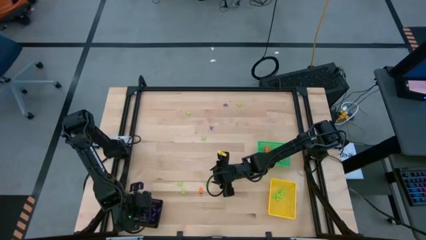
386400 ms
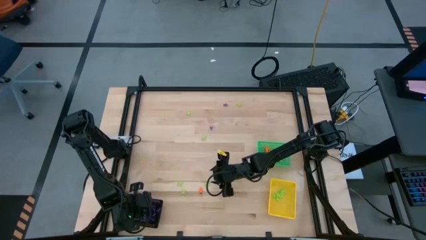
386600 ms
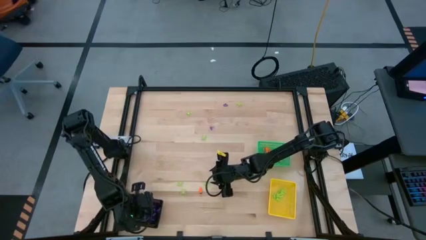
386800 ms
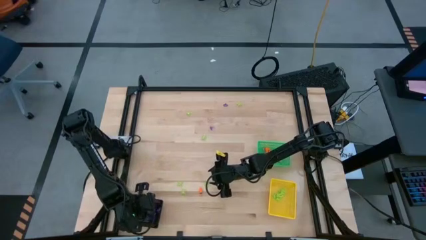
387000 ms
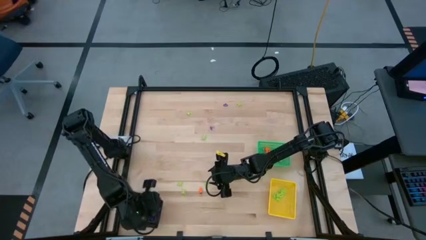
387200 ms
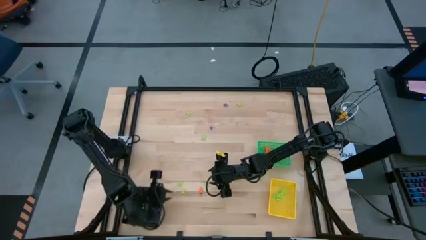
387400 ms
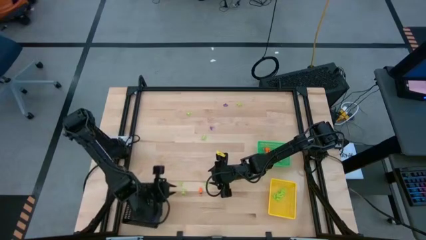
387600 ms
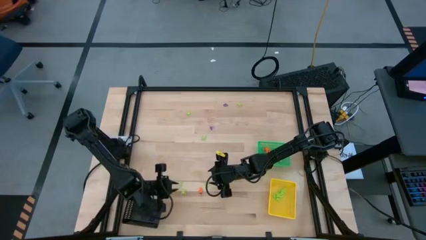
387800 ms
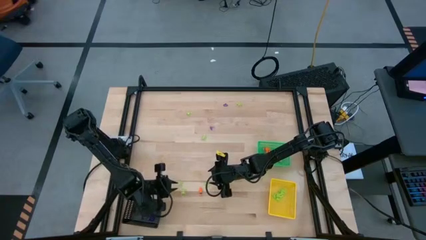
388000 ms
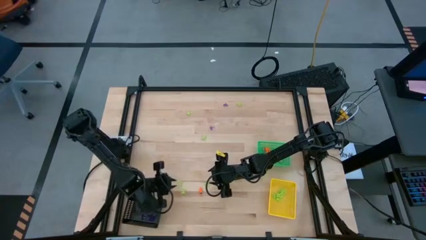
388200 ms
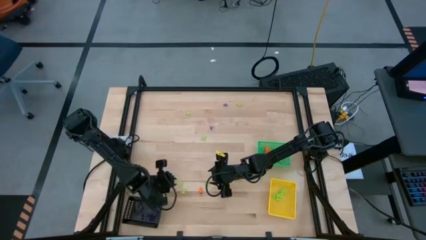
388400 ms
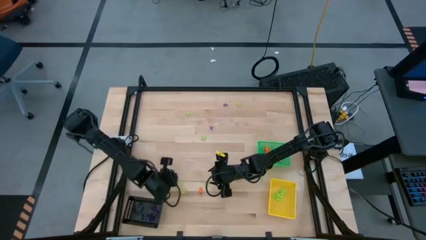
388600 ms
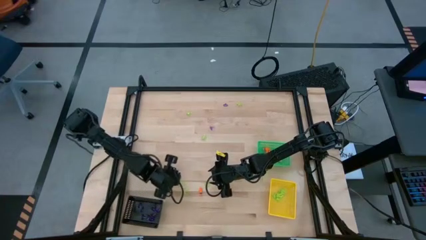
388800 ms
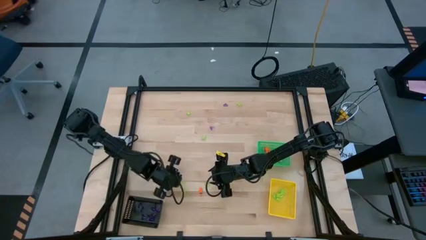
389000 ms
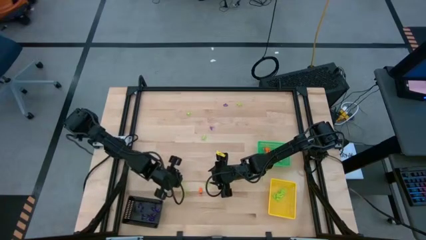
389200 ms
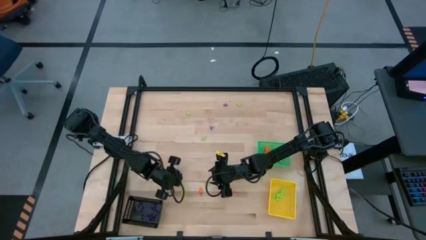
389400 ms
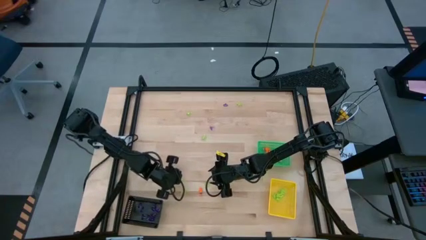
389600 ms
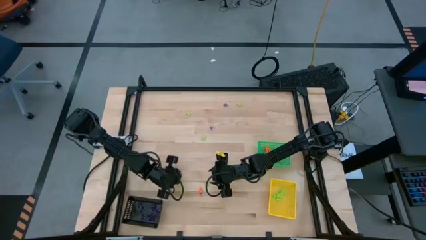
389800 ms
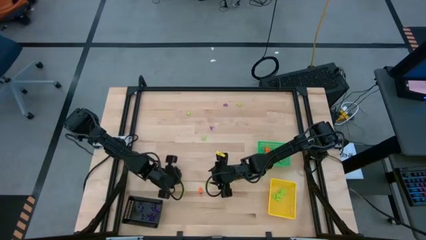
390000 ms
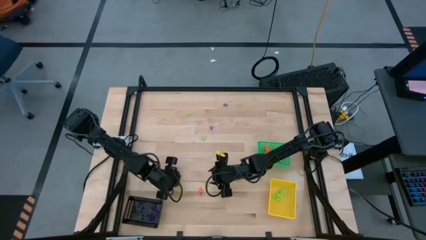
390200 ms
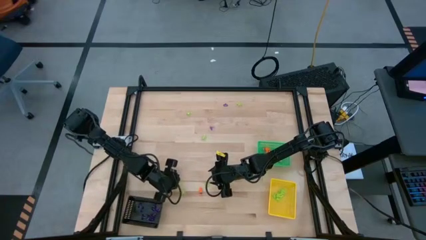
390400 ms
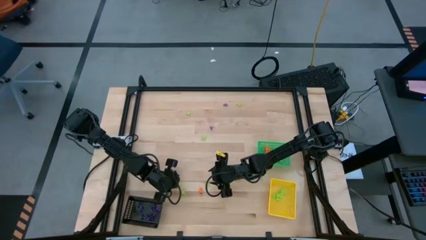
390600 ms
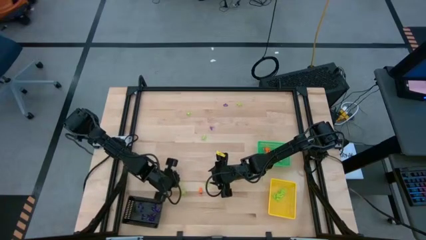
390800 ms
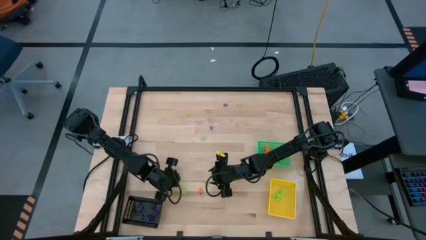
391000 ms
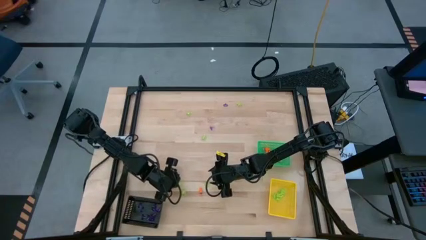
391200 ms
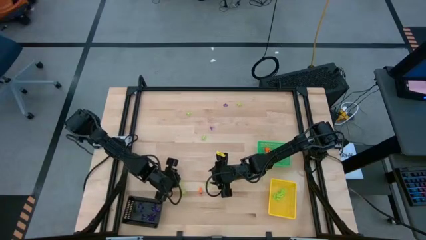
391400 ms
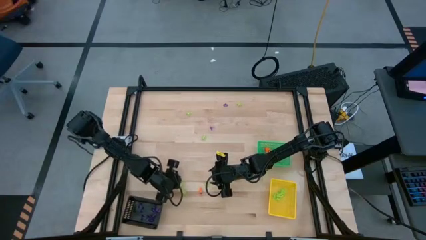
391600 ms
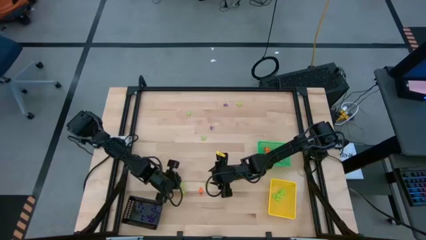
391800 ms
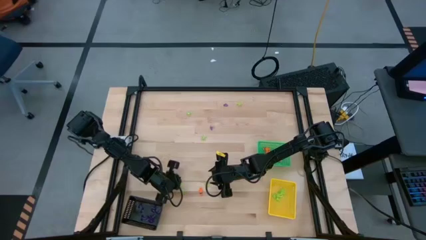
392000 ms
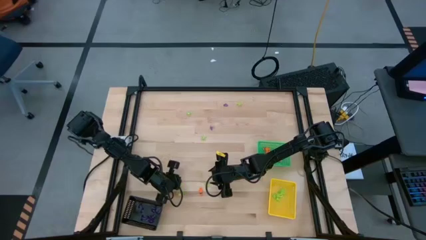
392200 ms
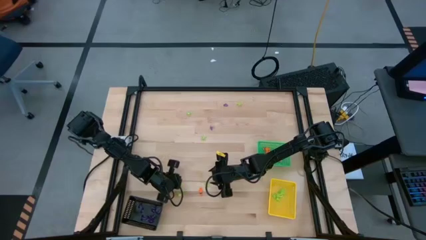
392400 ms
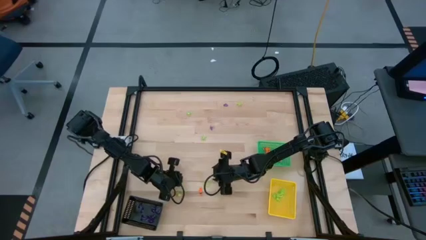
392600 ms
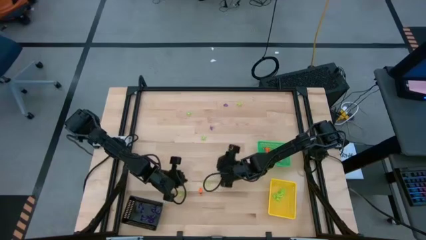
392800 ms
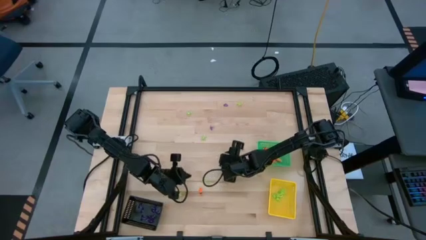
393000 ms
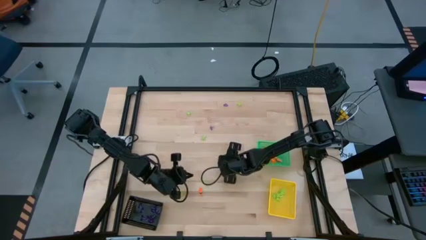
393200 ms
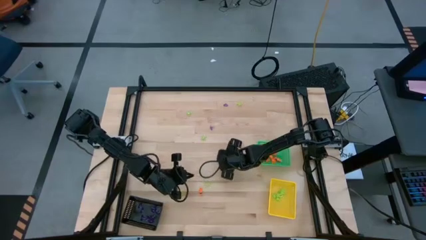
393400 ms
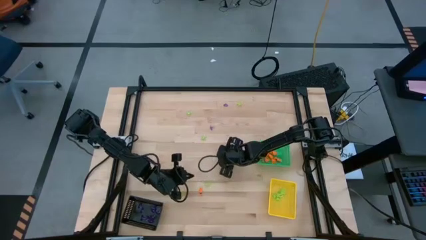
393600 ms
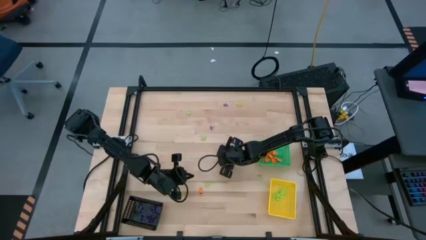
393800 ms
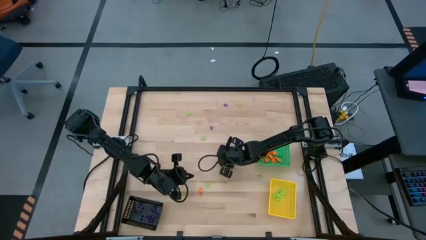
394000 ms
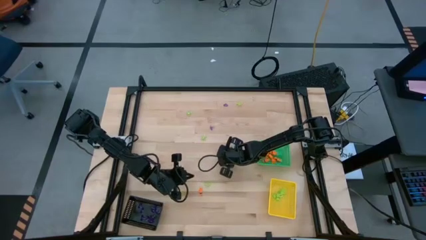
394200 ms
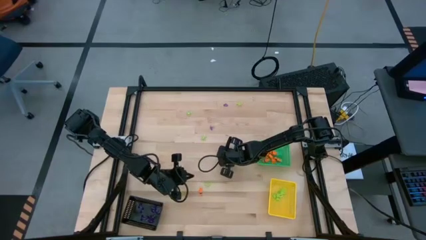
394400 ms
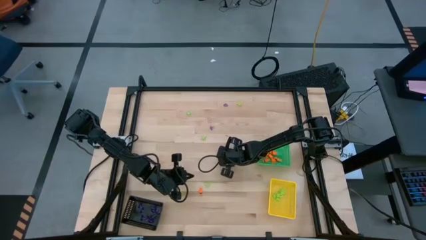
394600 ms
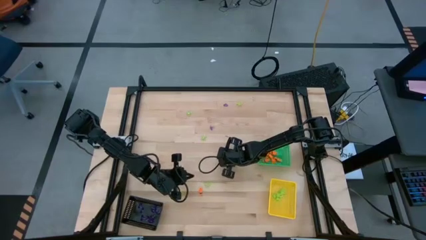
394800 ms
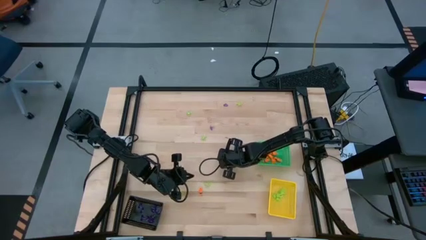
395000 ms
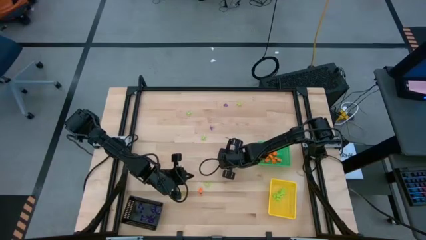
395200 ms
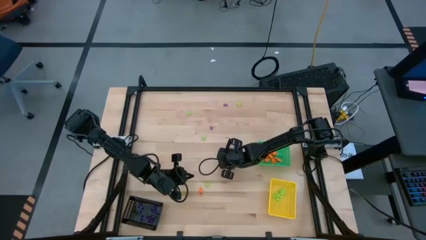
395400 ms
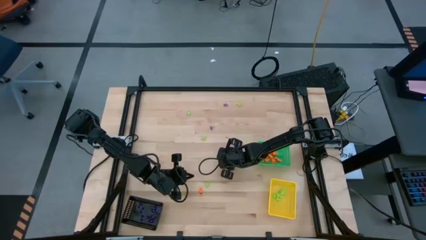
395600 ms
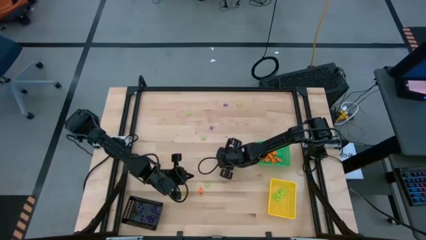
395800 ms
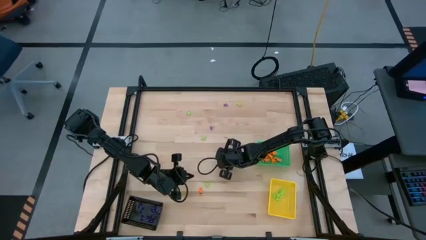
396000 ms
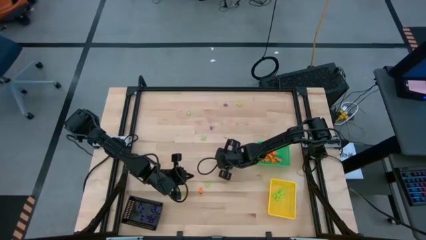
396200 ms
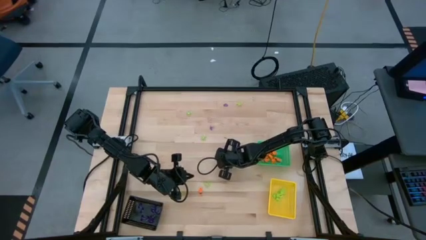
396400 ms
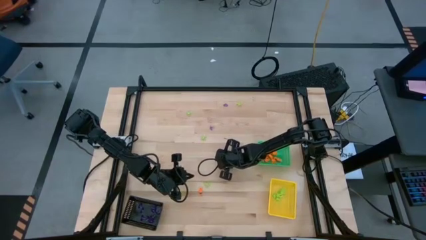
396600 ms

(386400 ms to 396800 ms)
Task: Sort Halloween decoration
Put the green spider toy into the yellow bin
